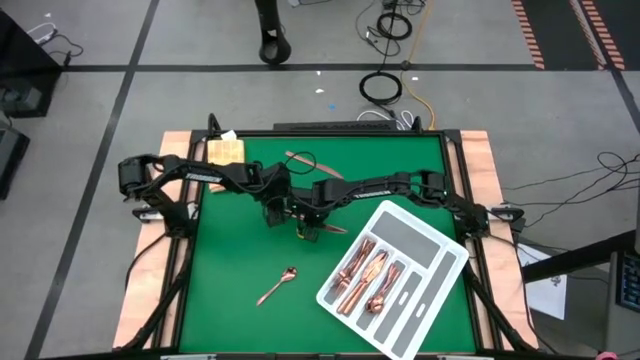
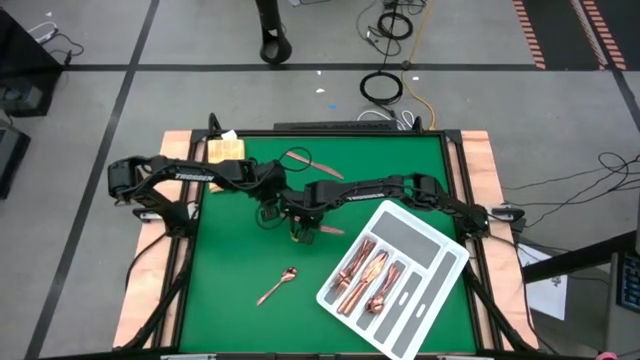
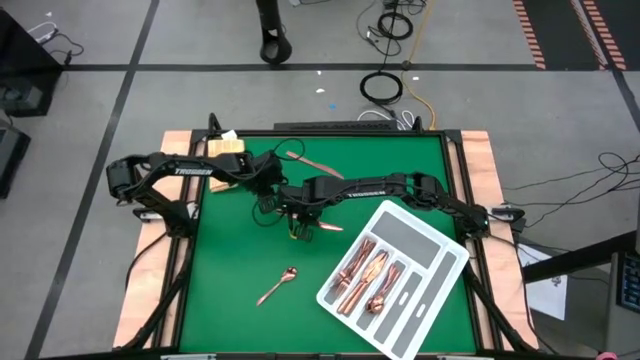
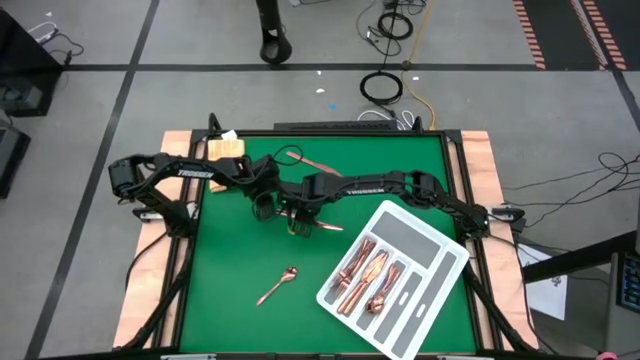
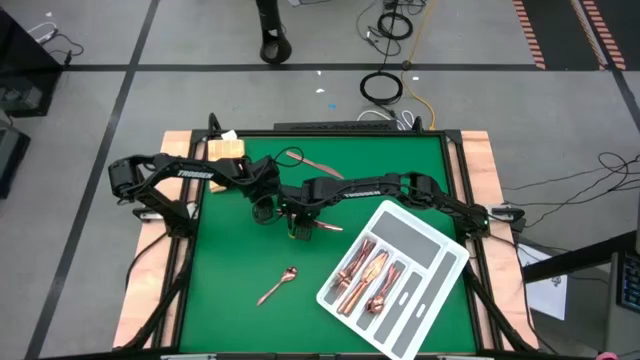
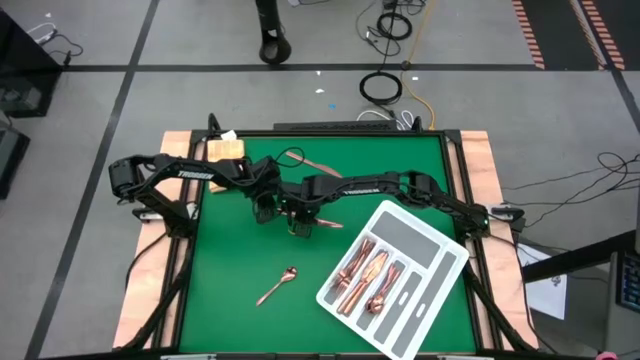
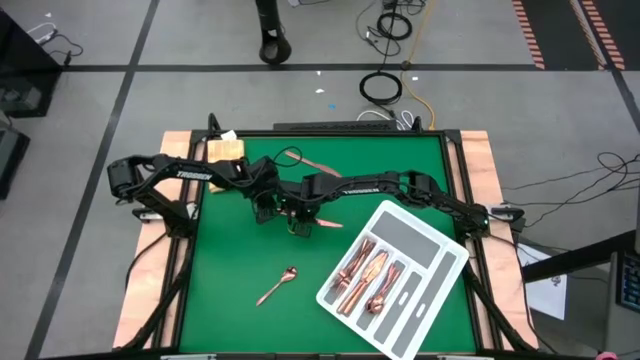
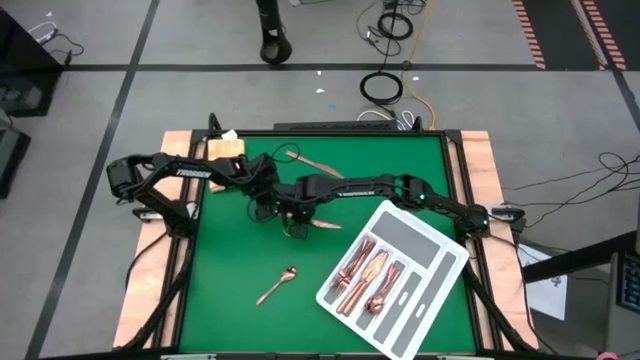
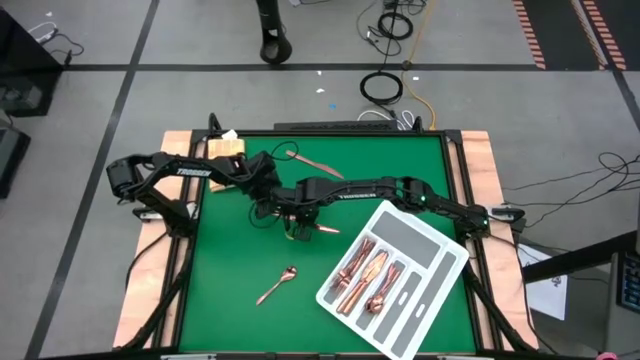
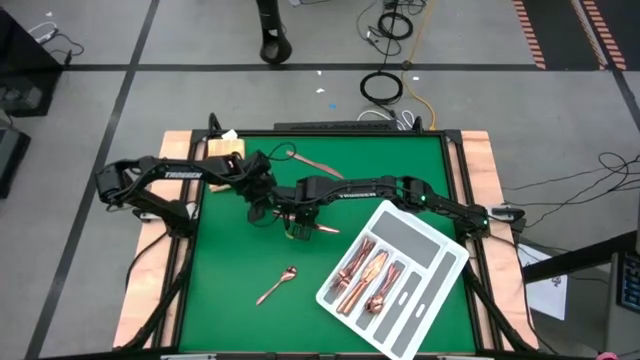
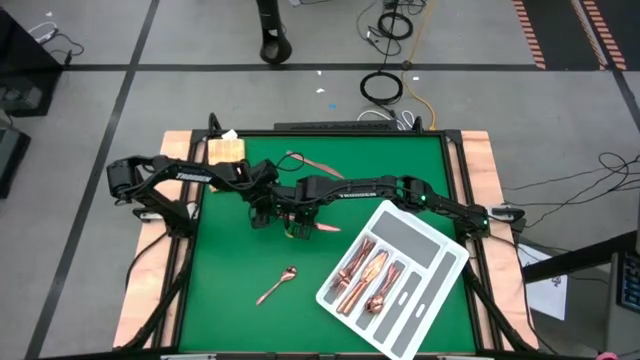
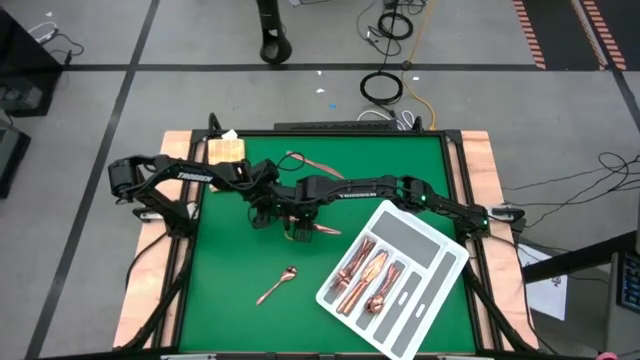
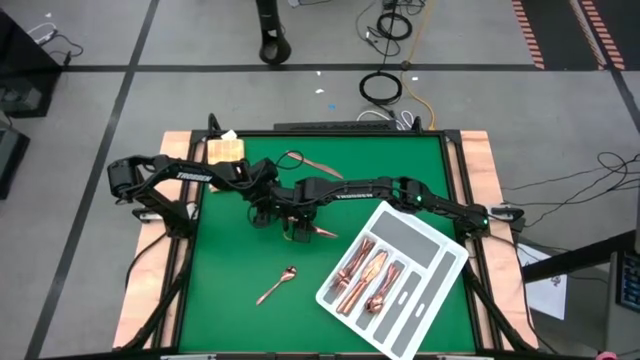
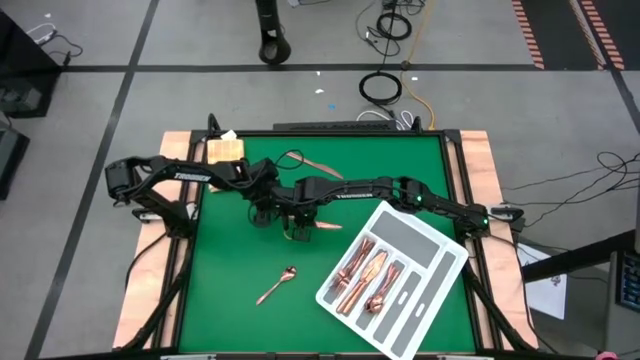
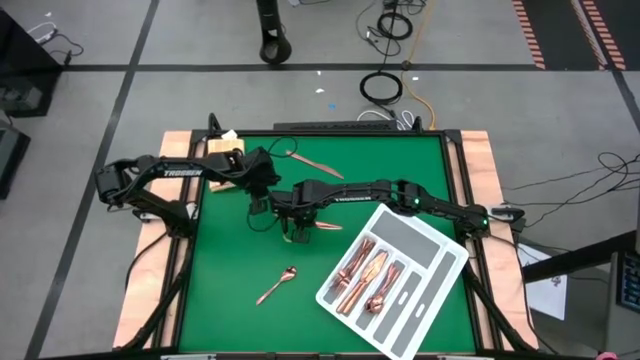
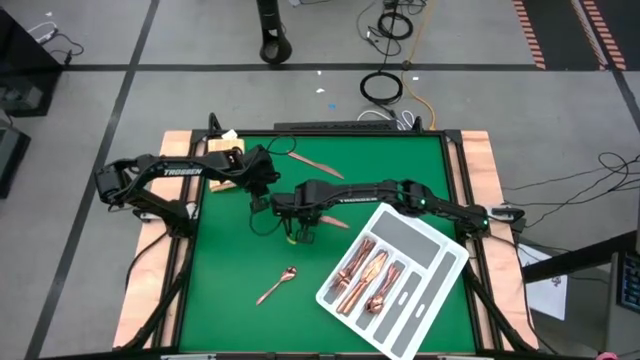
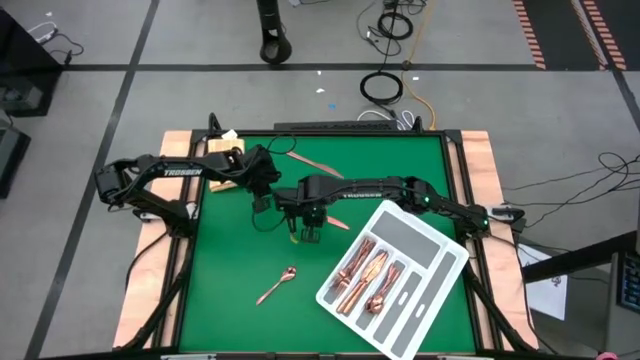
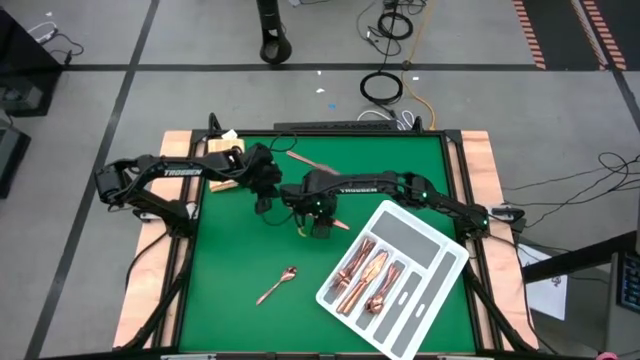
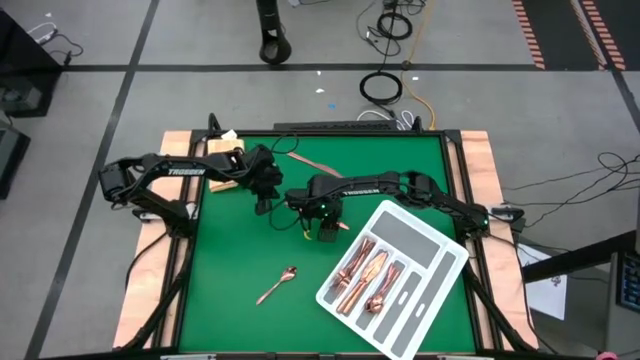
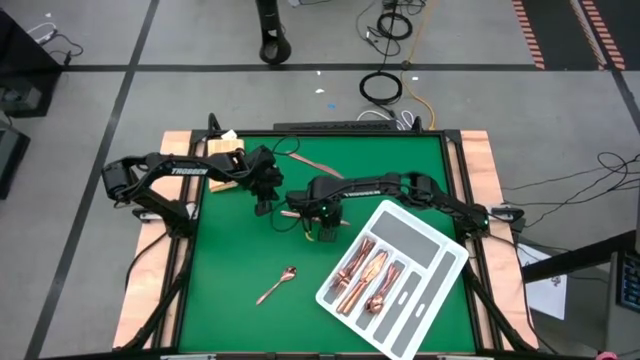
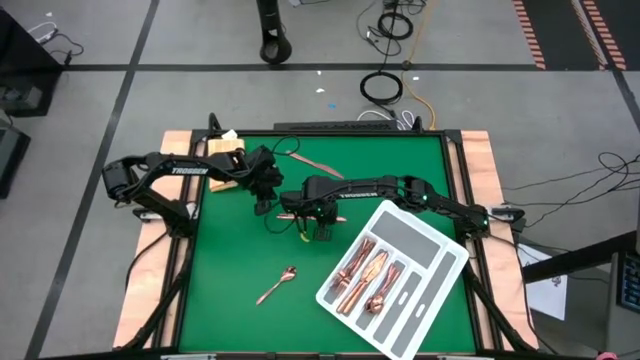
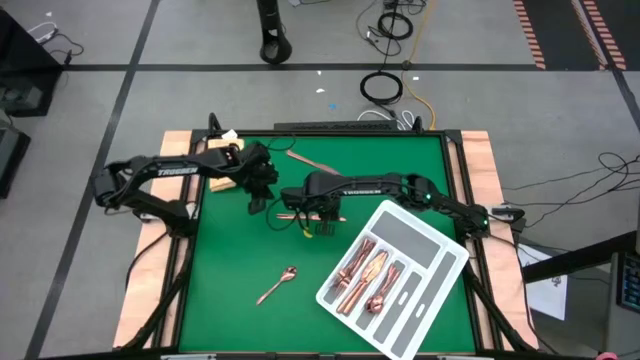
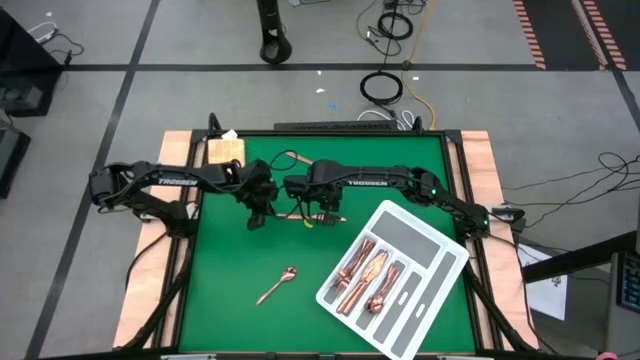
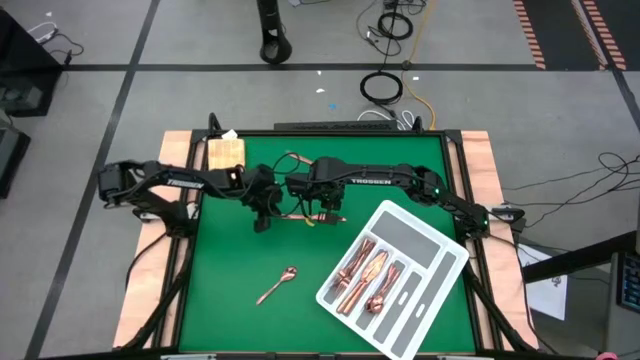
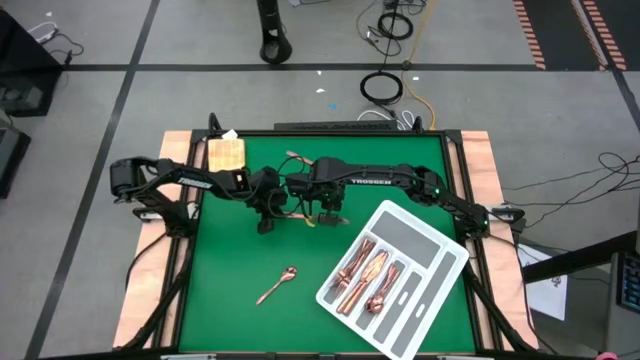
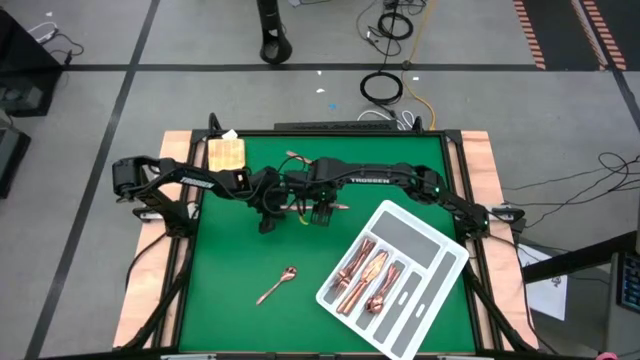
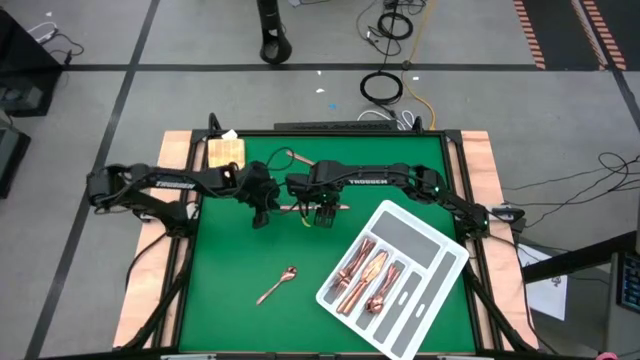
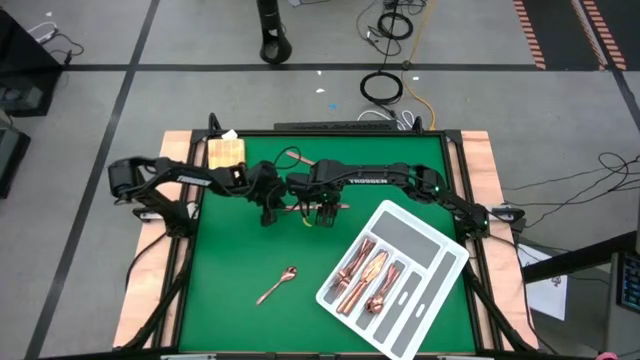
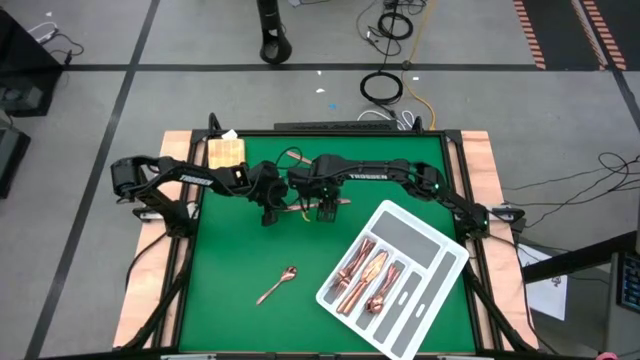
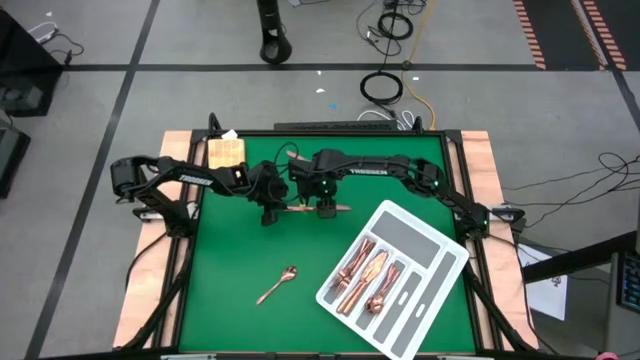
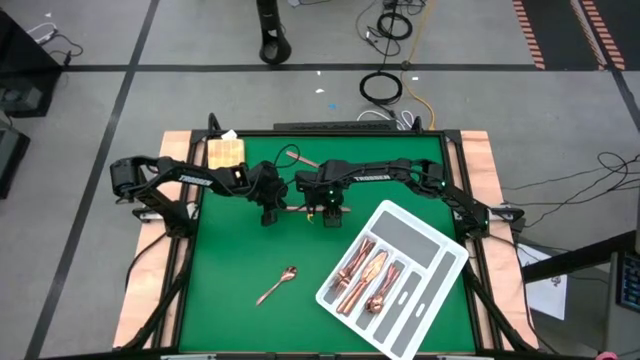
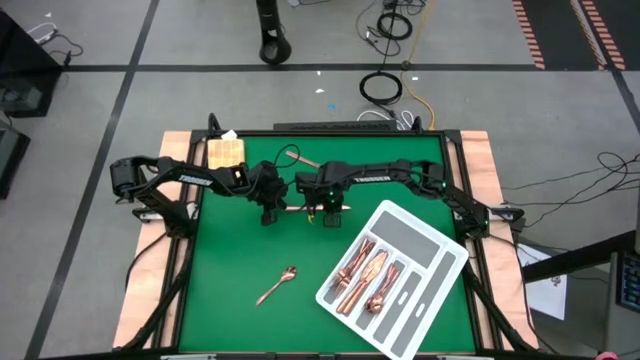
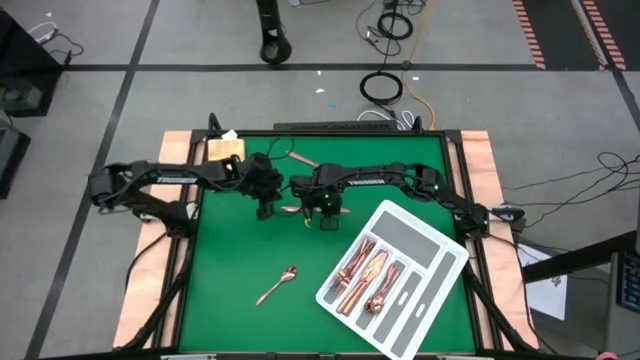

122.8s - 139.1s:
Task: Sort silverware
Put the bronze knife into the silverware tray

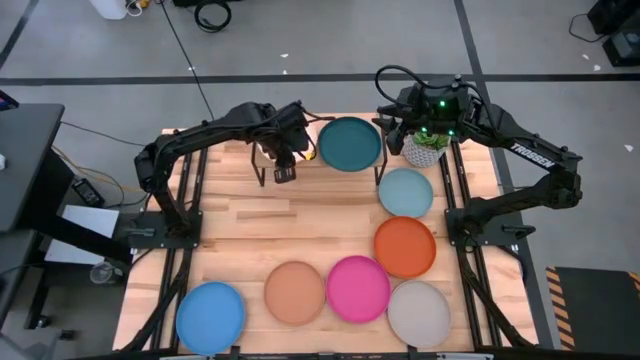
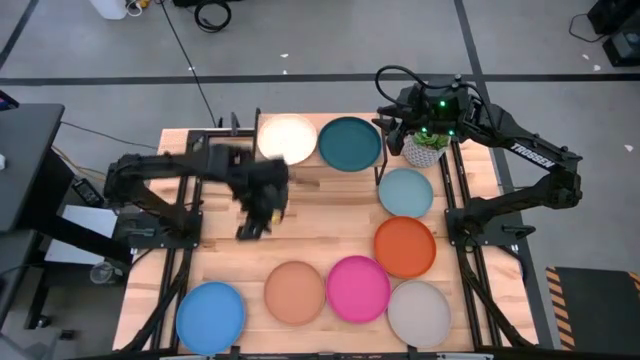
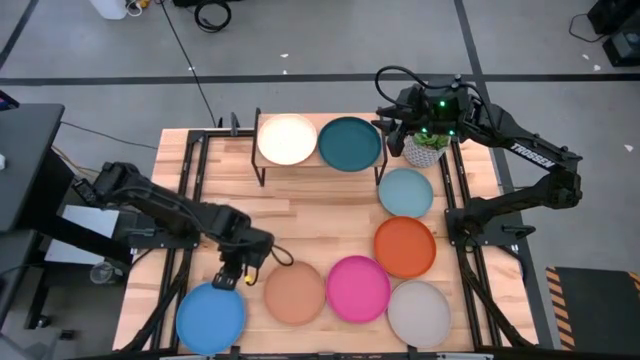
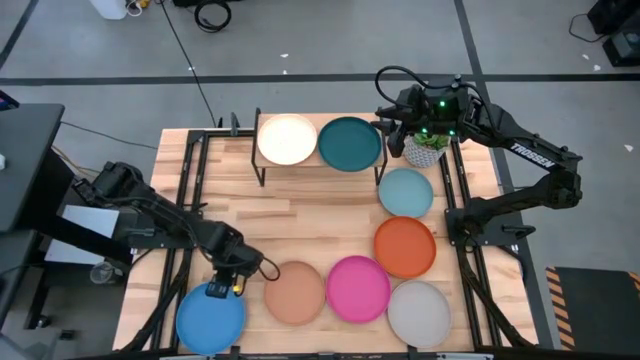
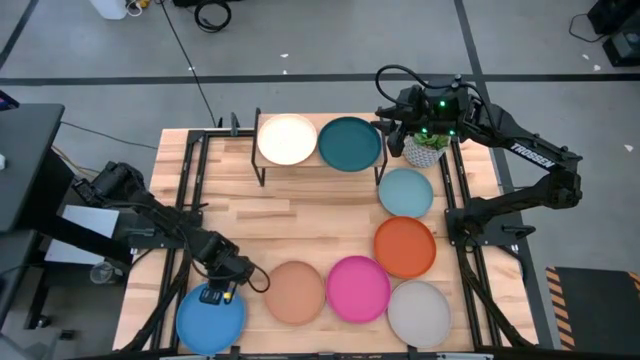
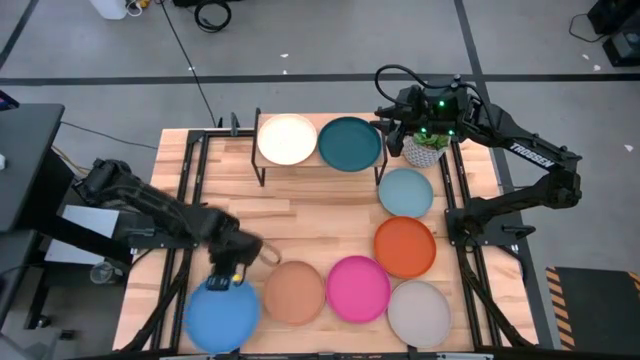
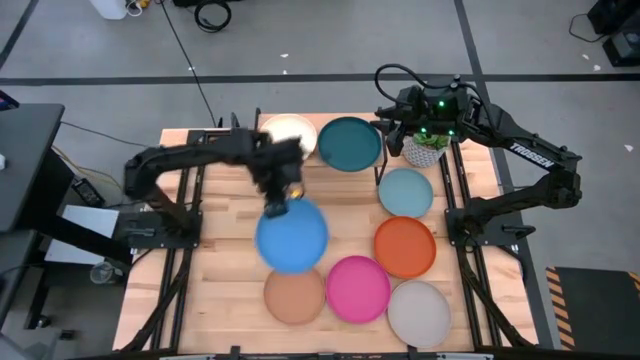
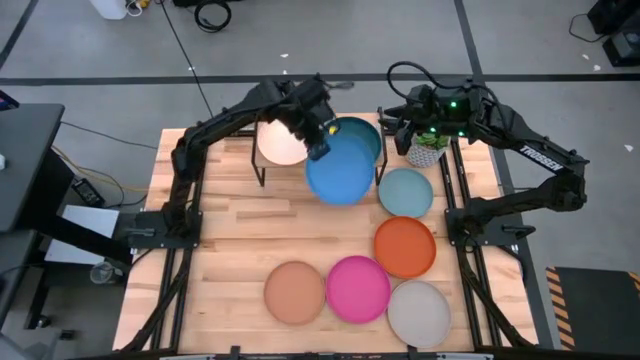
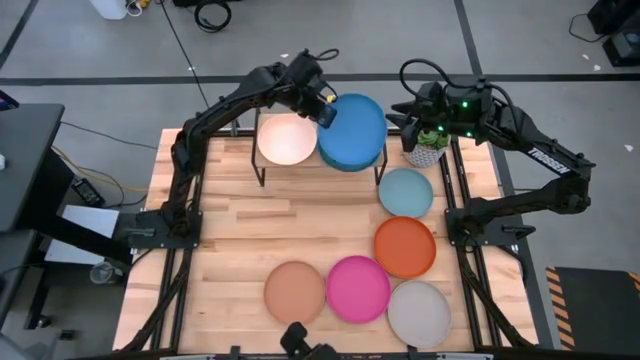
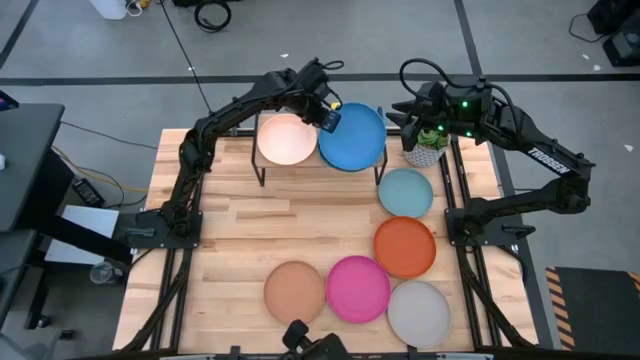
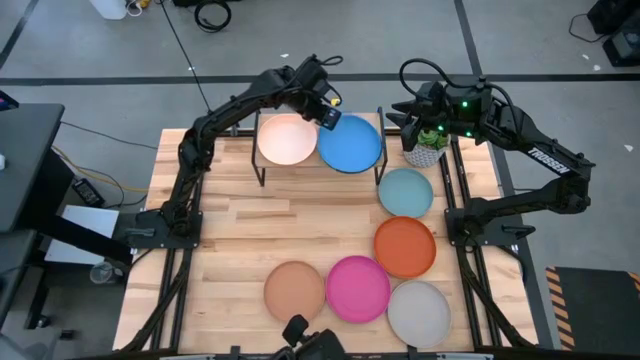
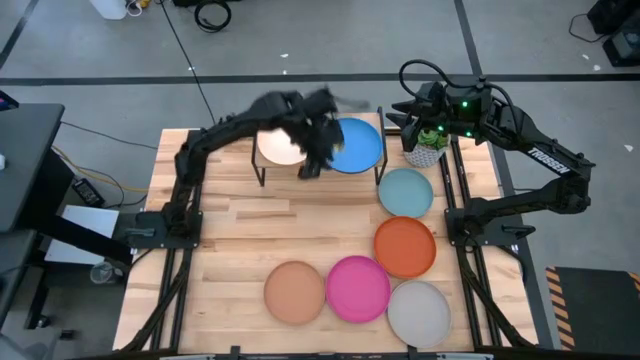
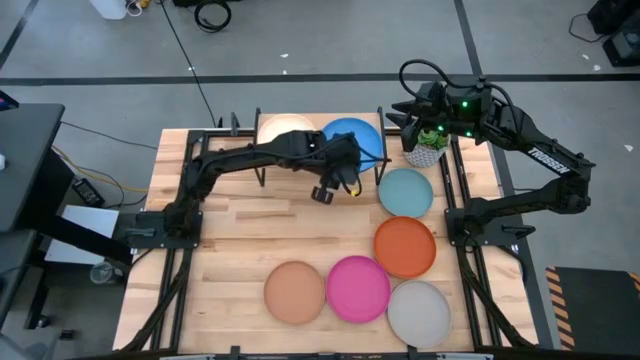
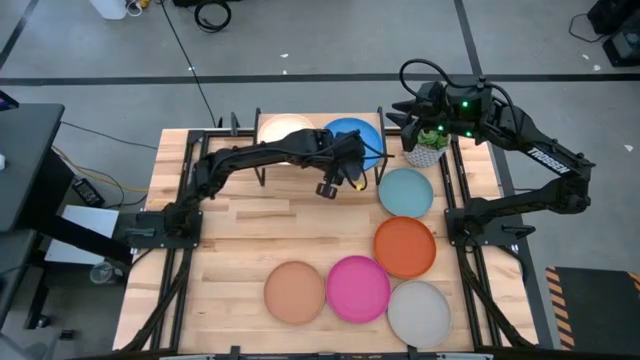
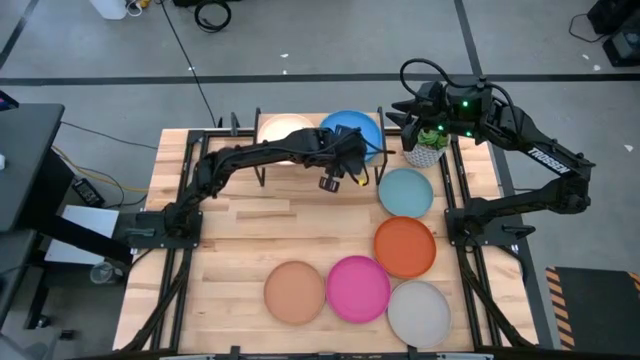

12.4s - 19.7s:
Task: Place and stack plates onto a shelf
Stack the blue plate on top of the dark blue plate on the shelf
